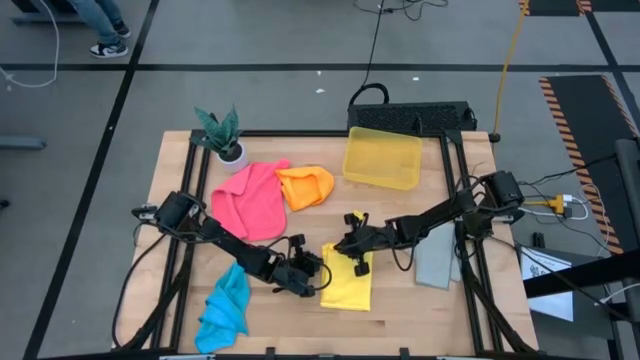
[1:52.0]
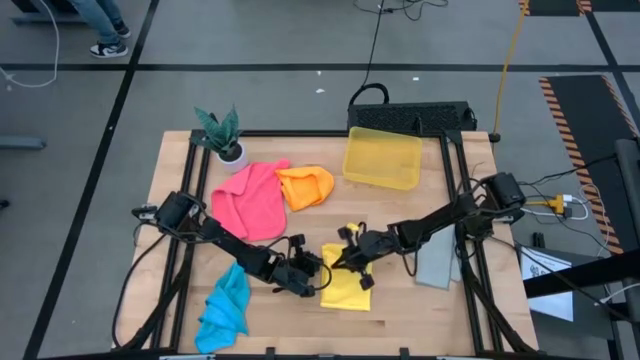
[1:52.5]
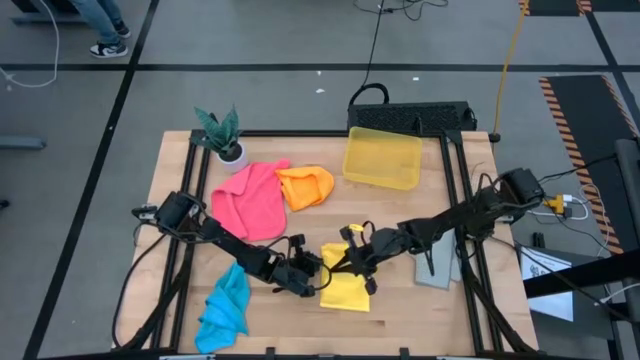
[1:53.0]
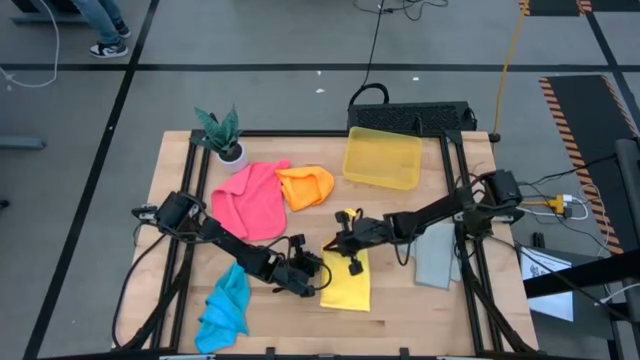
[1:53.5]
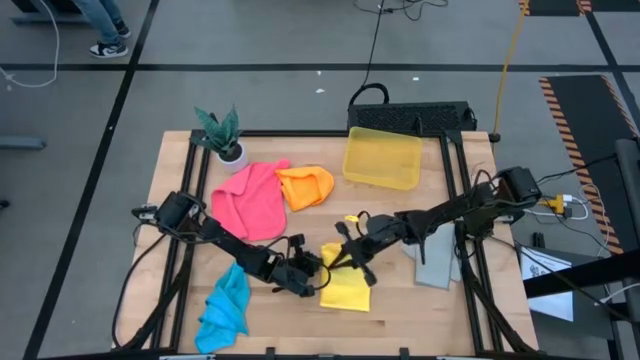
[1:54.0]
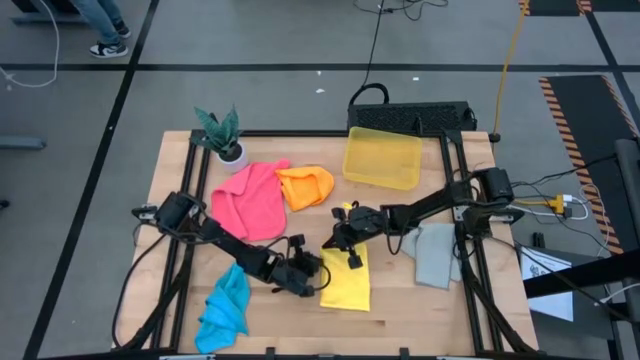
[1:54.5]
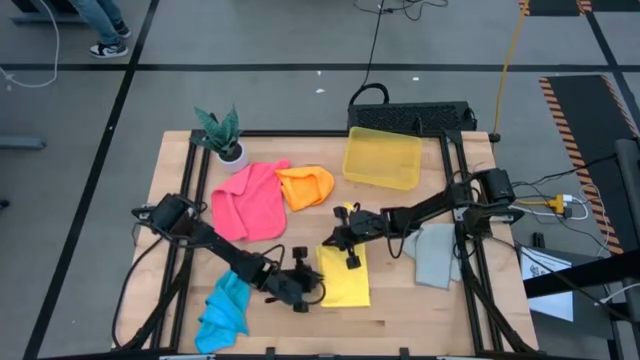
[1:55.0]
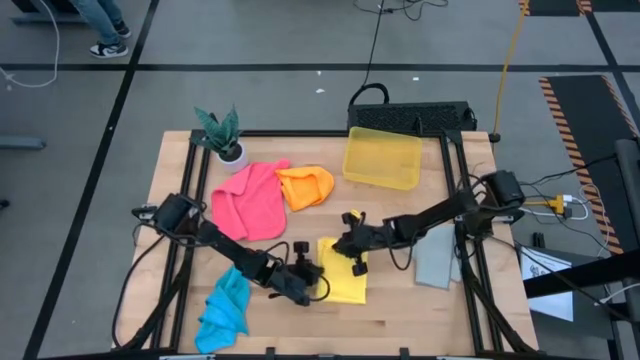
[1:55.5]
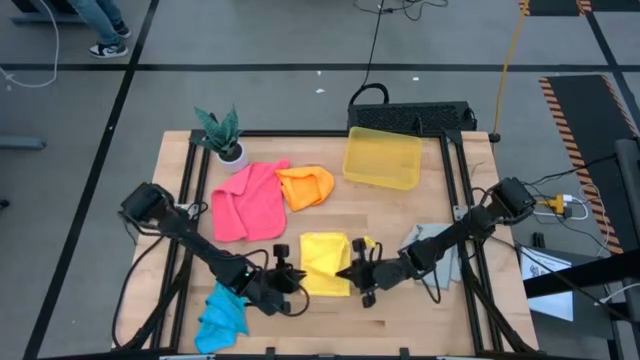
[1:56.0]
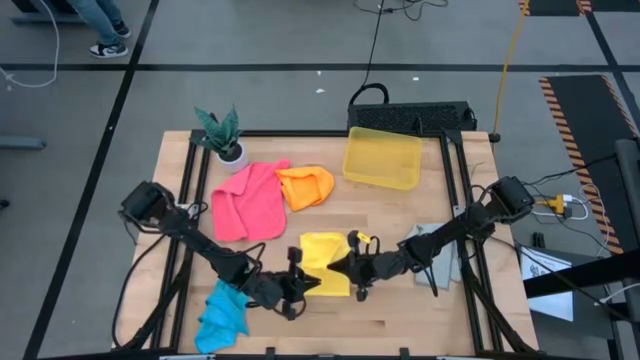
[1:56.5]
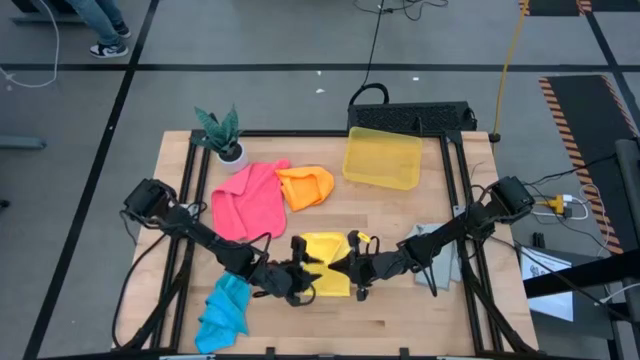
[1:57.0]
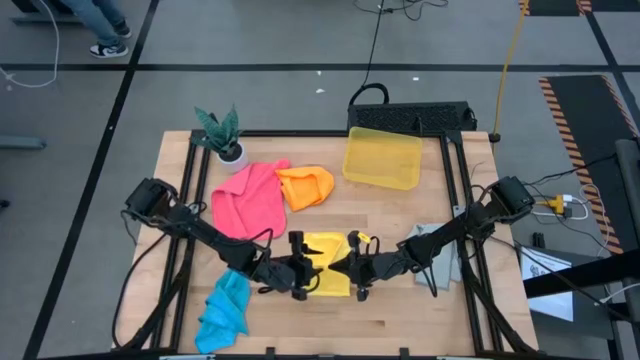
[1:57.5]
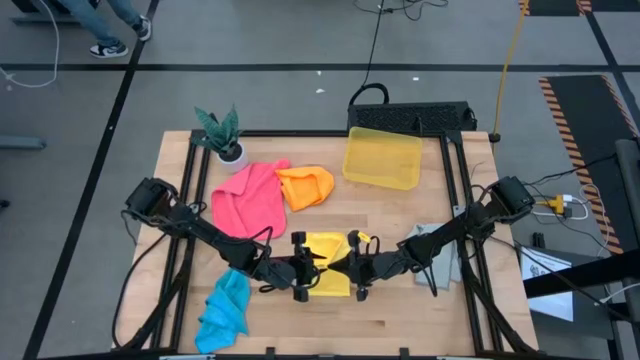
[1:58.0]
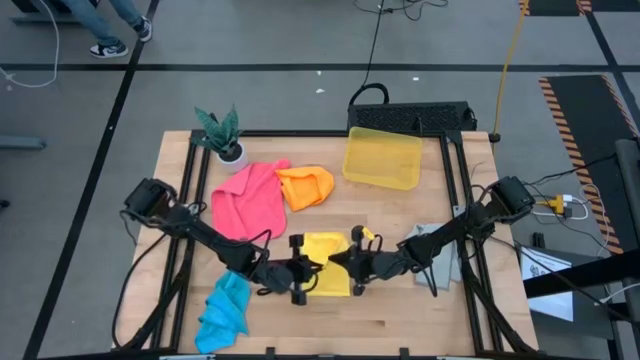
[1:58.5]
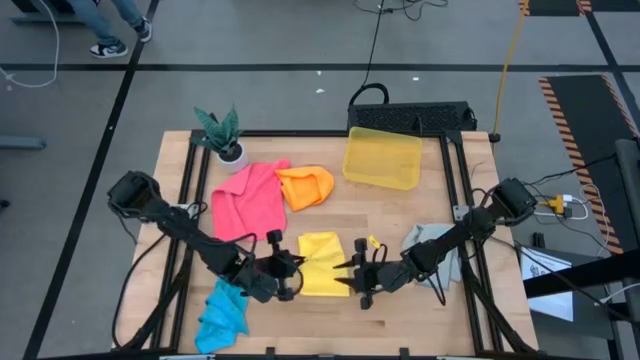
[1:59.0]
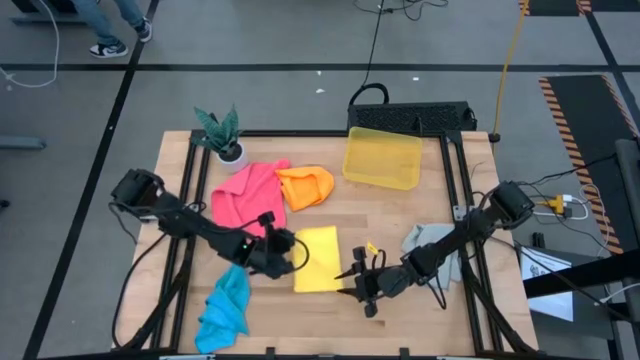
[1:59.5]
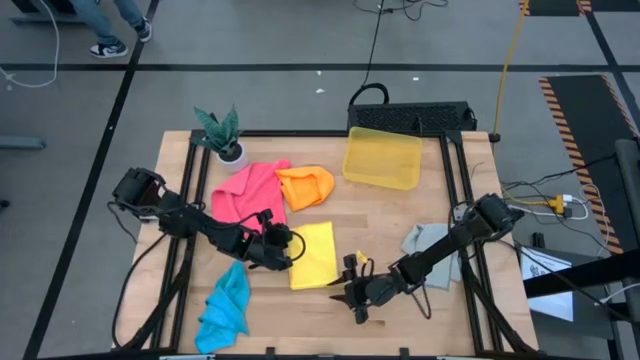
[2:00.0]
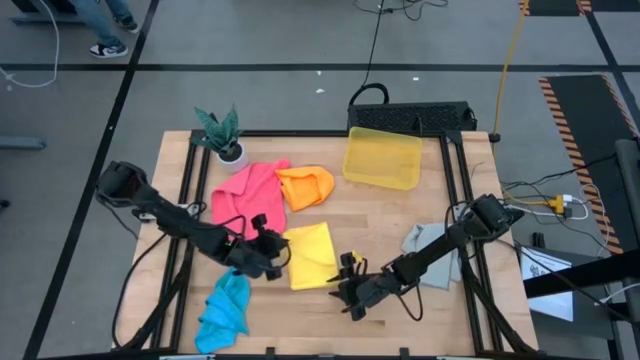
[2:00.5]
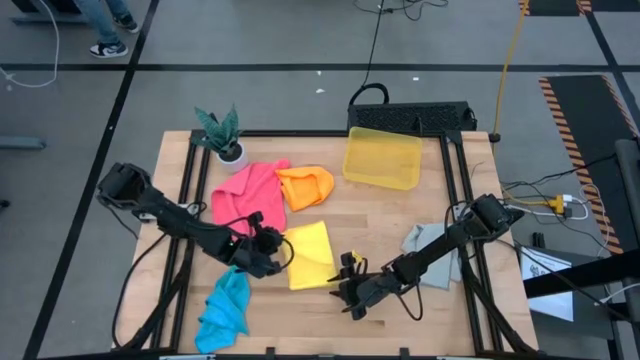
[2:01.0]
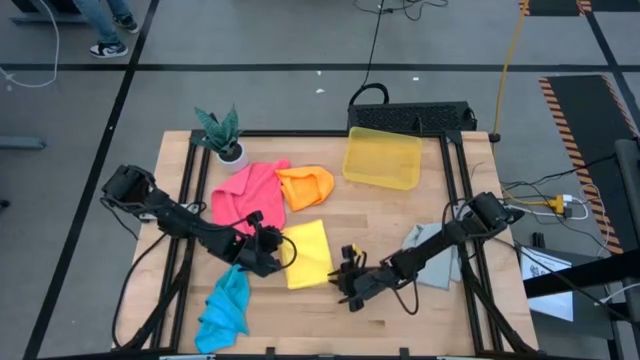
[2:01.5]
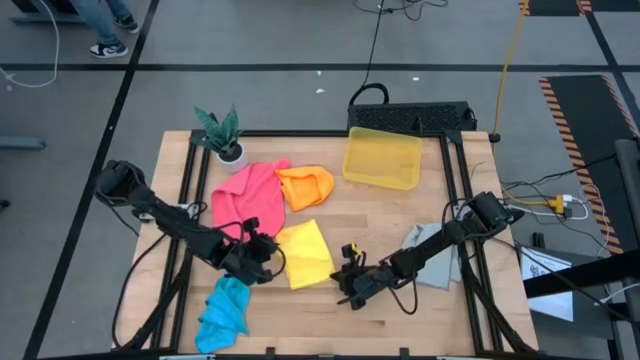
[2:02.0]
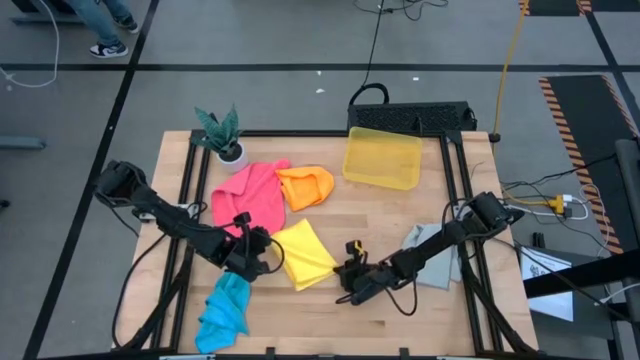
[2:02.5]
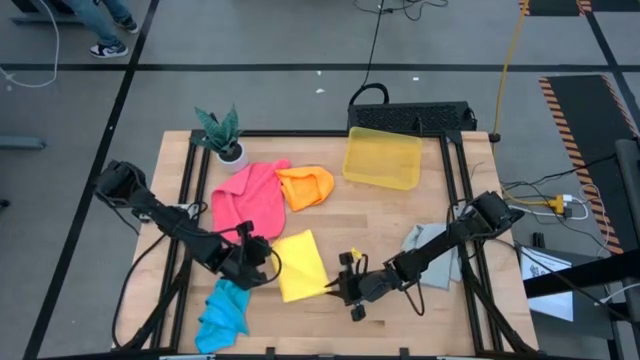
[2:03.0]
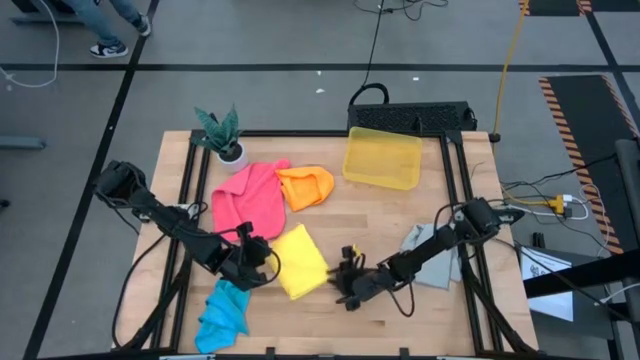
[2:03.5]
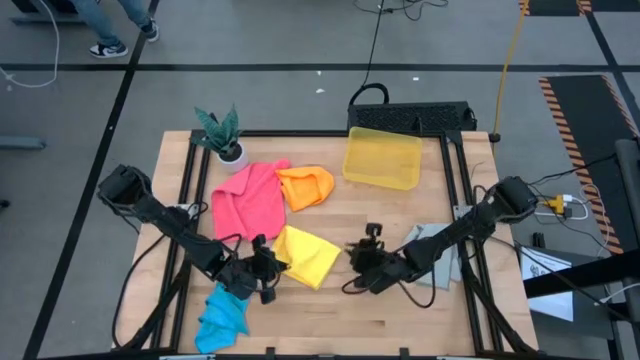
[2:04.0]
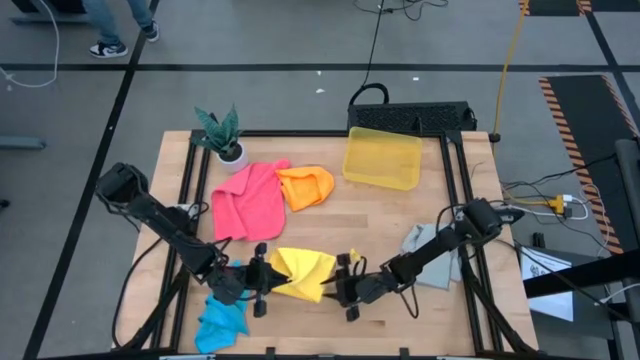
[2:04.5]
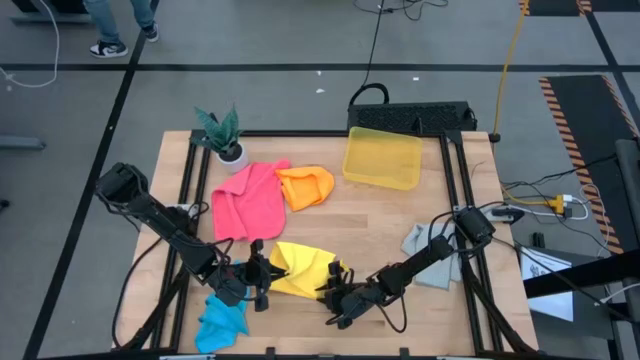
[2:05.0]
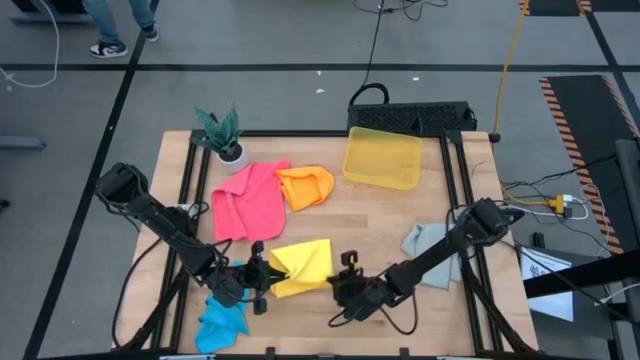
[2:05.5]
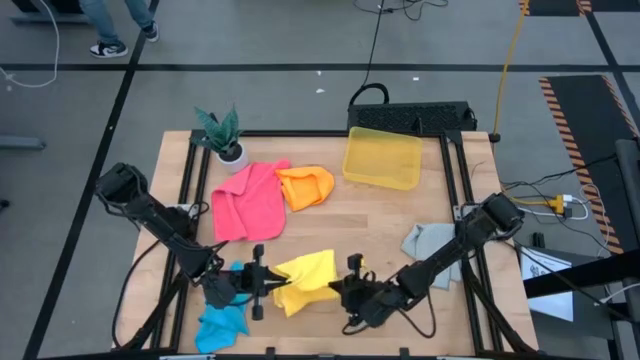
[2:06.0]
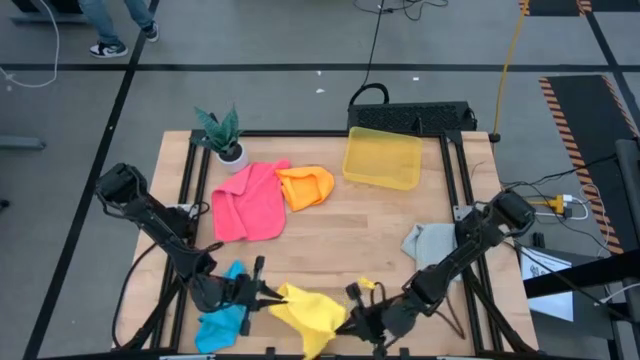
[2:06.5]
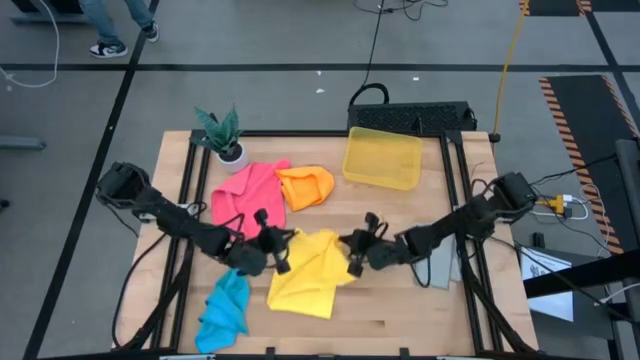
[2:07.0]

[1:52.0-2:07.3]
Task: Fold microfiber towels
Fold the yellow kitchen towel

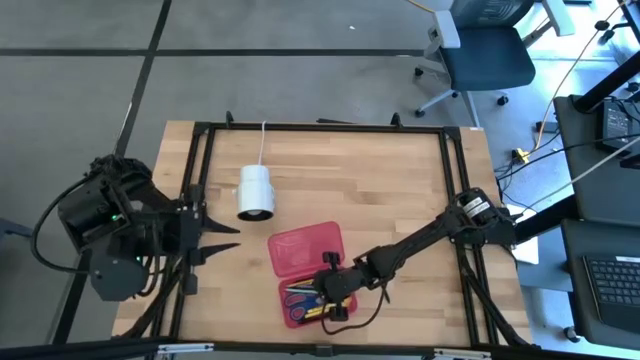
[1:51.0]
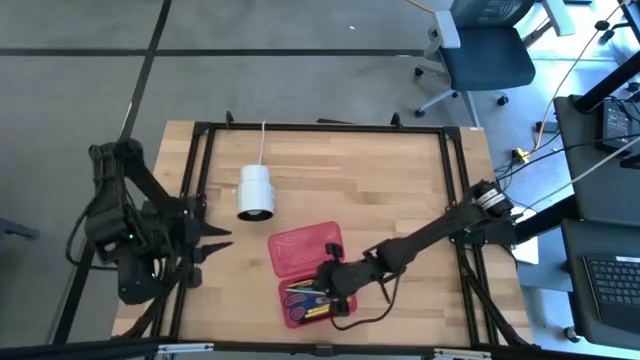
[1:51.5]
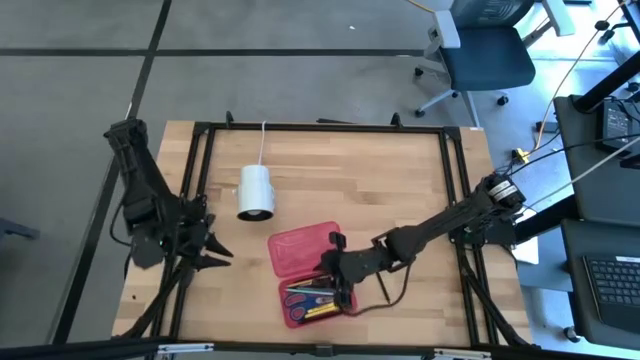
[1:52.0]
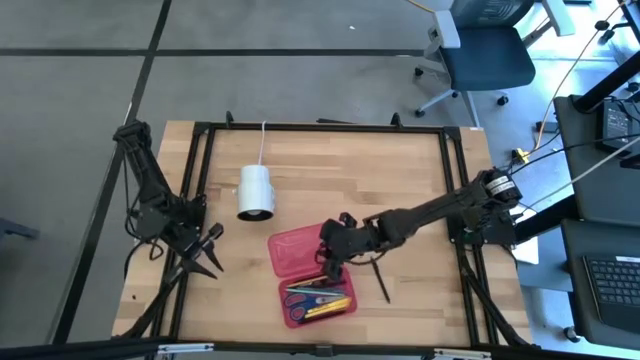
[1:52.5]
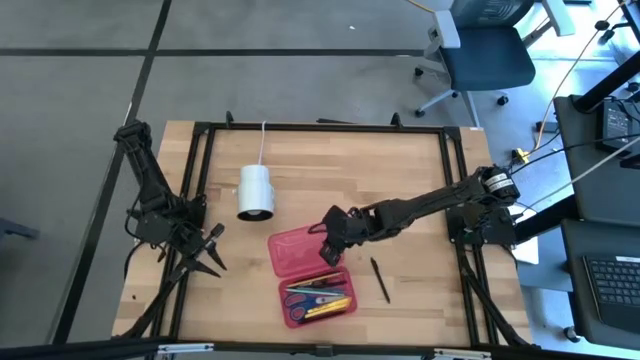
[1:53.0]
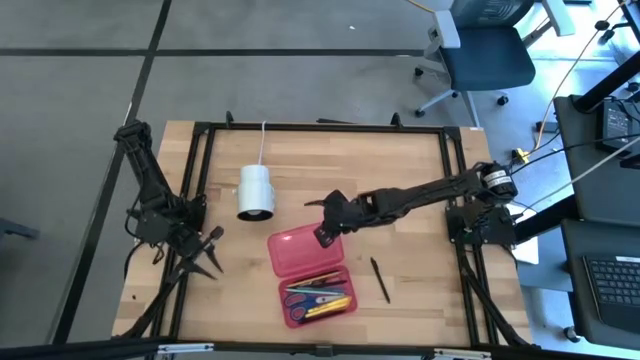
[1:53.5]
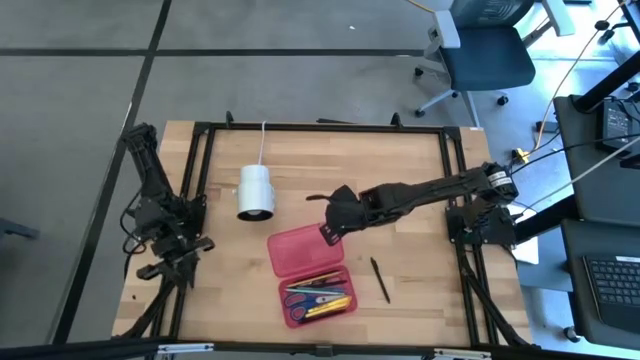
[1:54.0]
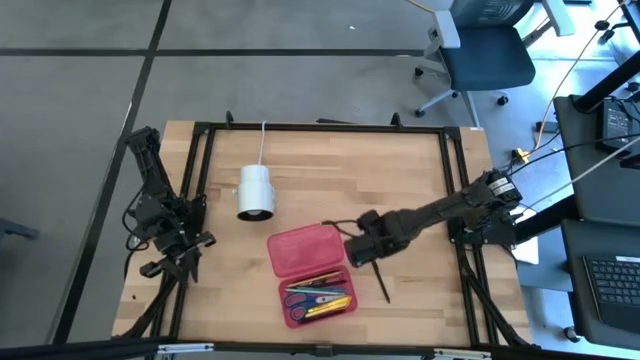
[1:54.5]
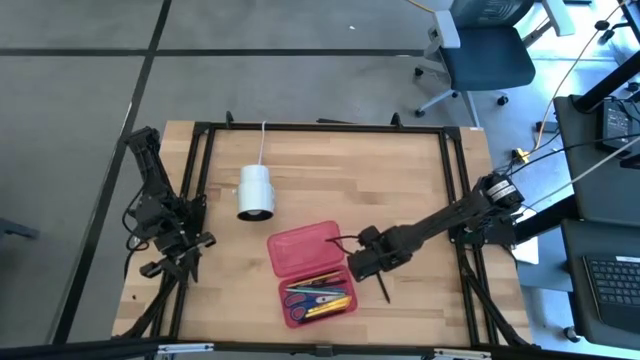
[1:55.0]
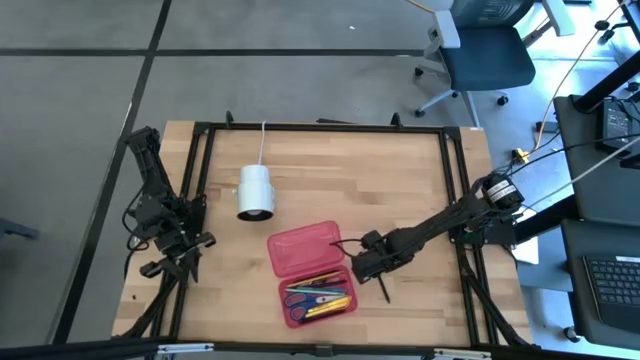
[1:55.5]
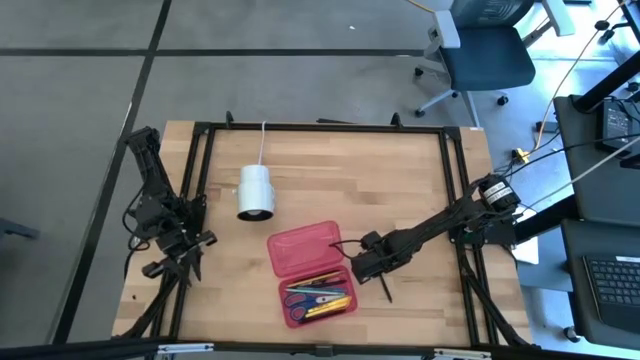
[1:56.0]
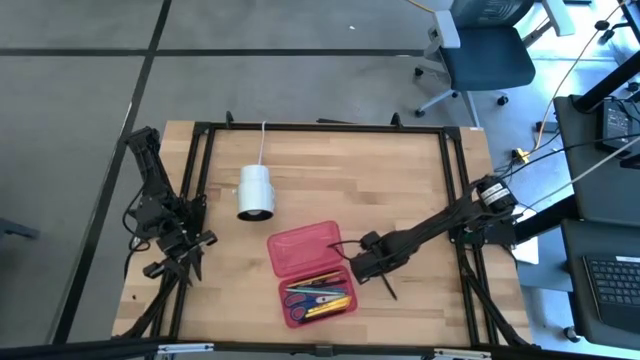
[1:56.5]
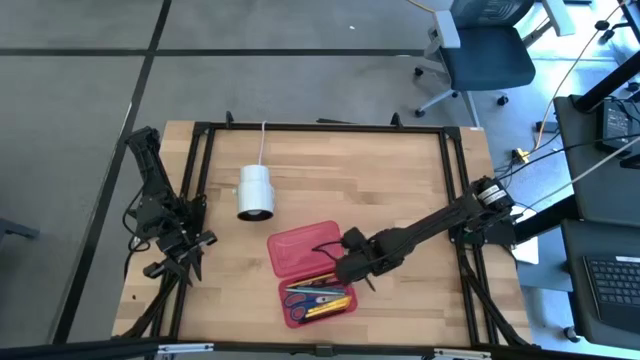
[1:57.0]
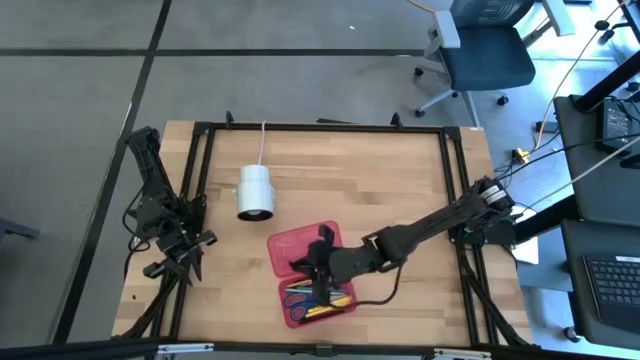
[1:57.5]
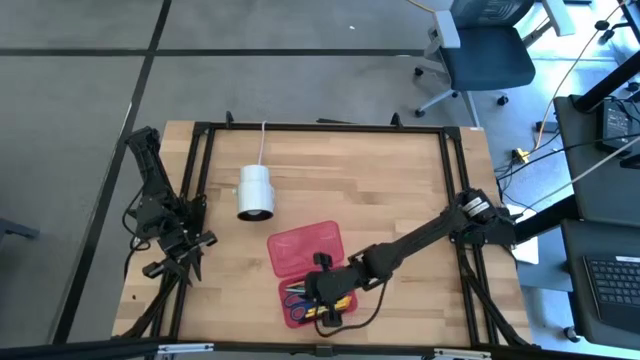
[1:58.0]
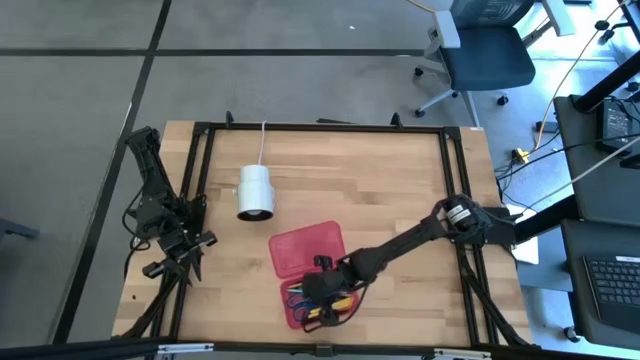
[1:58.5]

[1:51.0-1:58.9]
Task: Pick & place school supplies into a supply box
Put the black pen into the pink supply box
